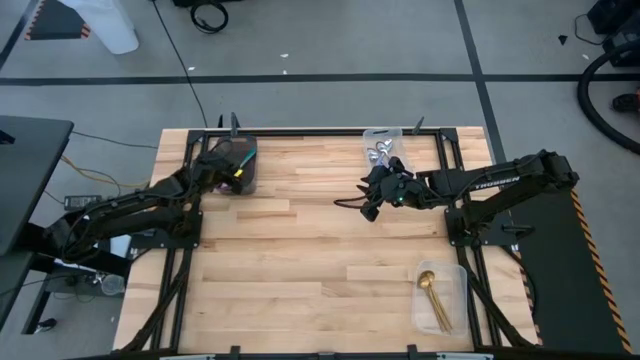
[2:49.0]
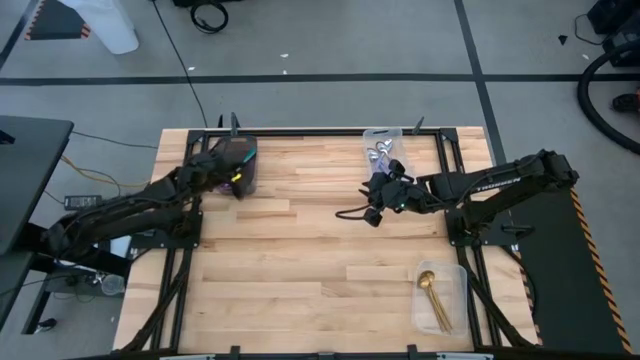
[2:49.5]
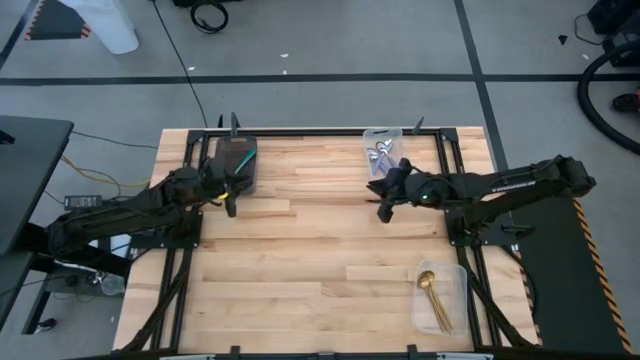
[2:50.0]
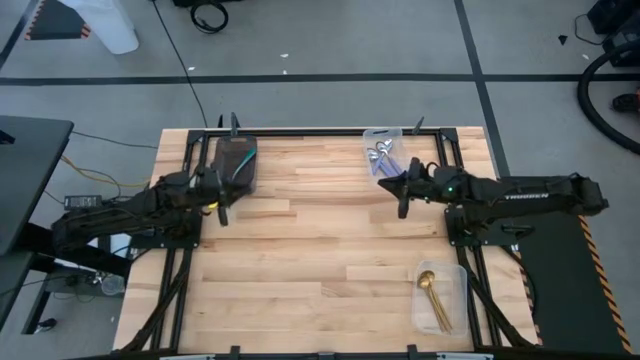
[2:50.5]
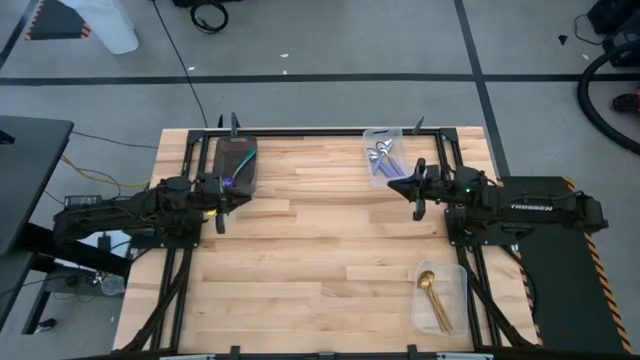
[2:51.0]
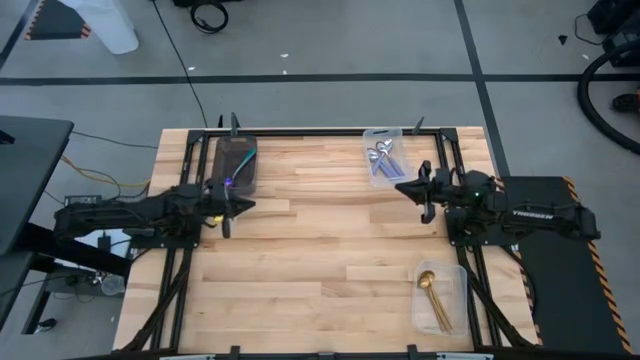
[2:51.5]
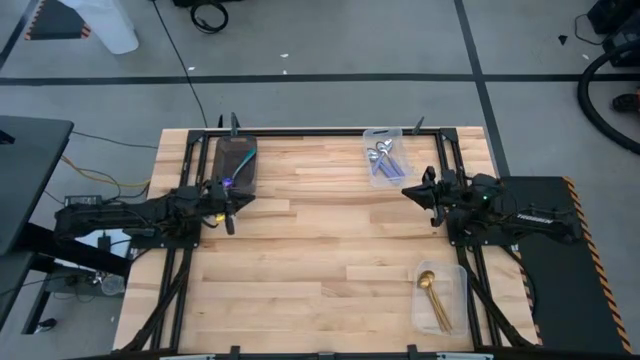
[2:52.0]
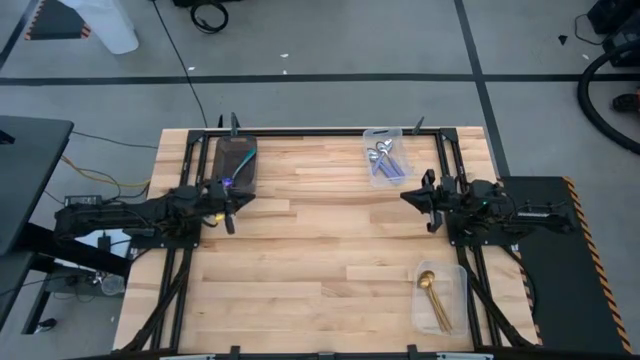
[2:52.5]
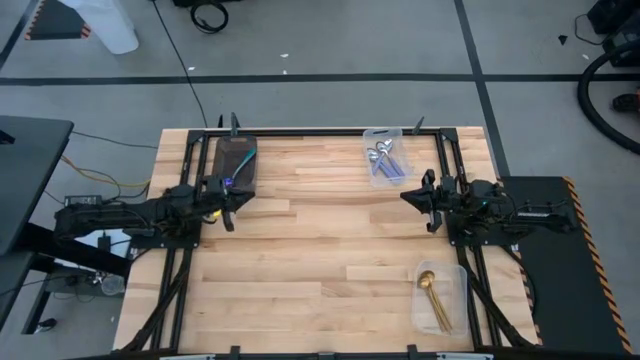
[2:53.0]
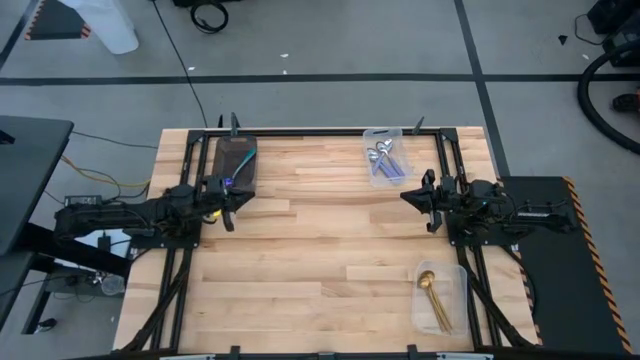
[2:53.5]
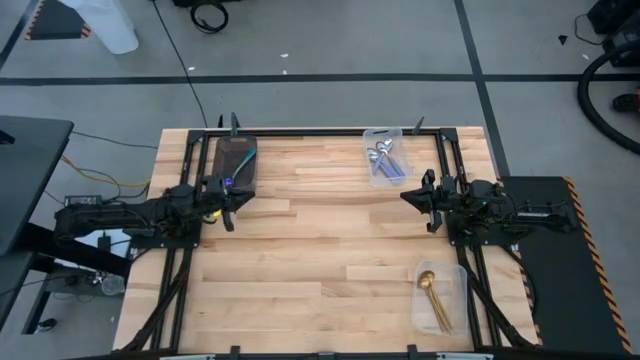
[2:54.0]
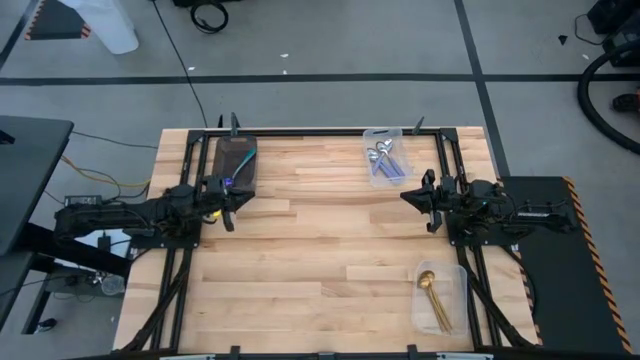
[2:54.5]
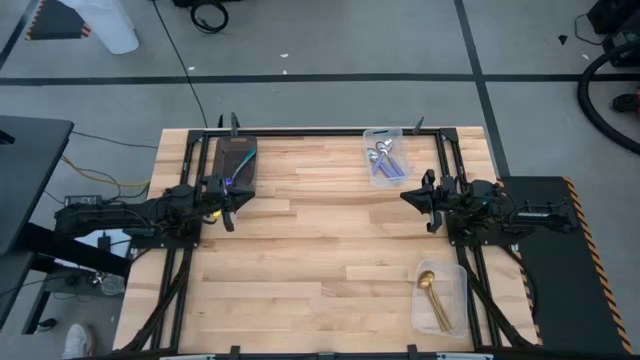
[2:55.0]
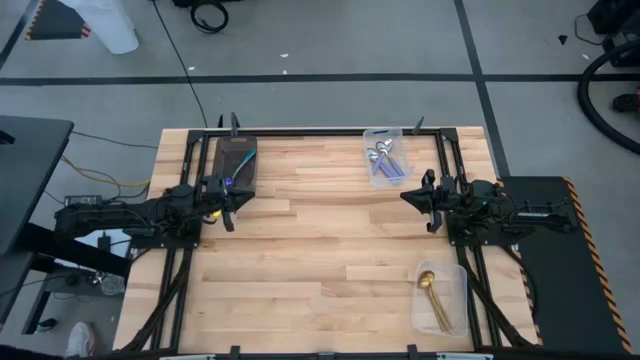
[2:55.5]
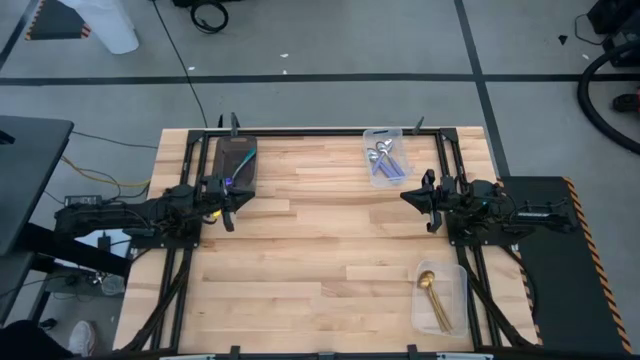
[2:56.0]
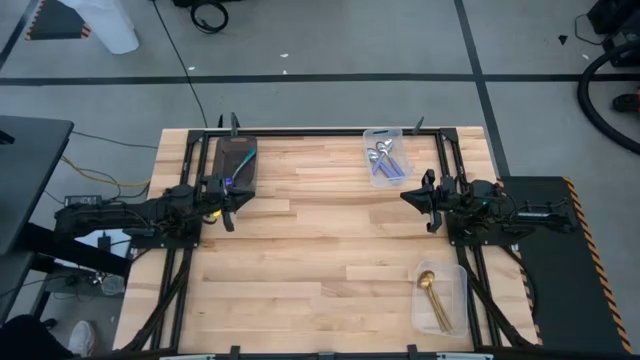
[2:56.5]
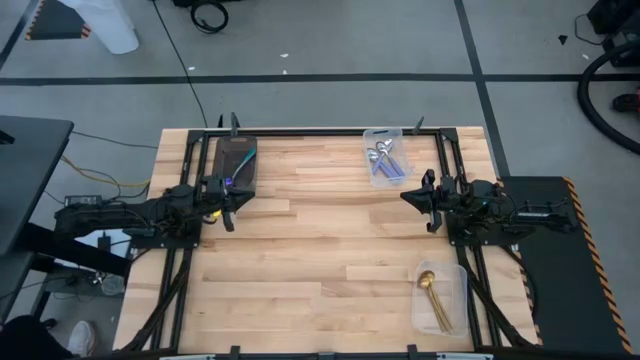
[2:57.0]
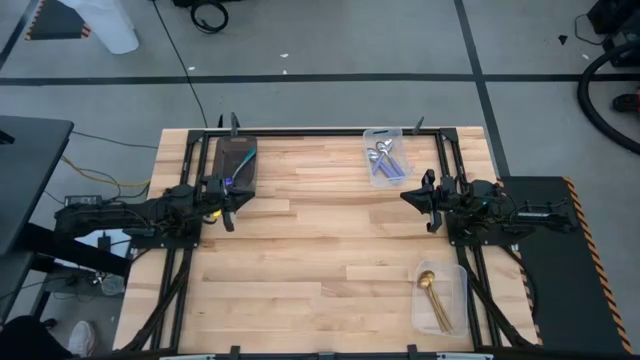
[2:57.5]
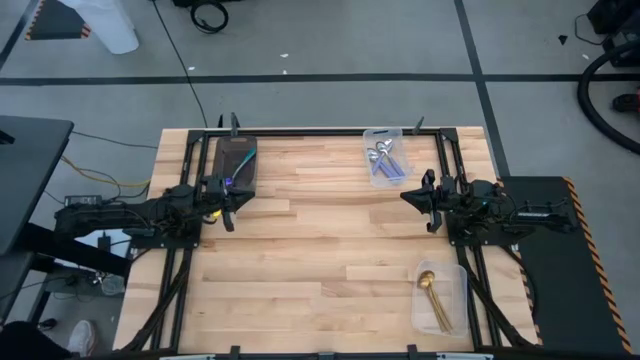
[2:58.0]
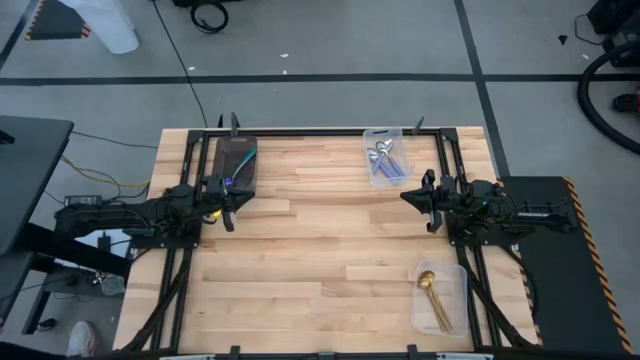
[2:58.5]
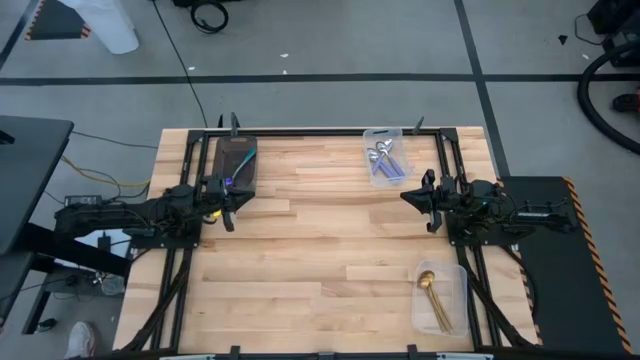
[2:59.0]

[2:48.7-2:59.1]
Task: Sort silverware by color (type)
Return to Home Position

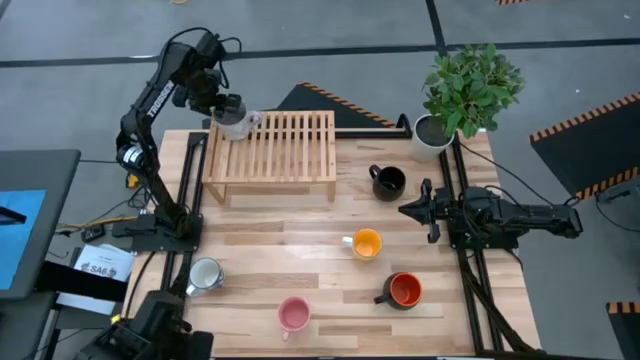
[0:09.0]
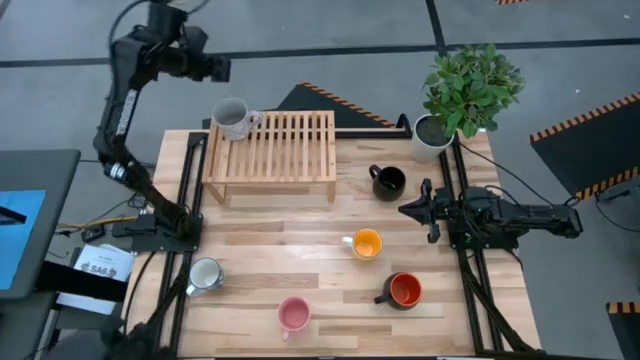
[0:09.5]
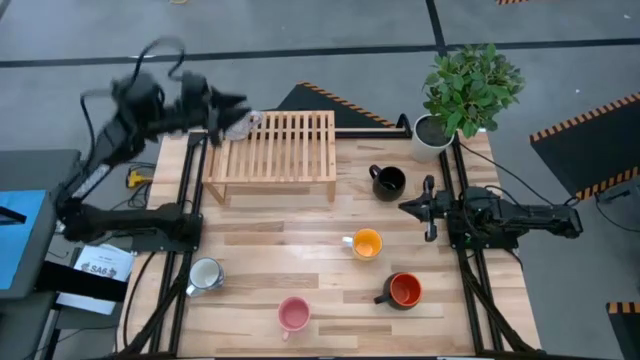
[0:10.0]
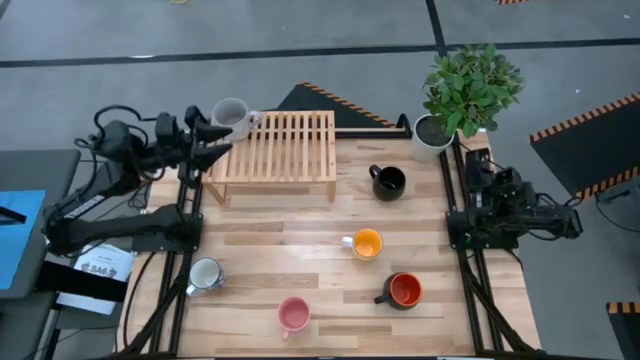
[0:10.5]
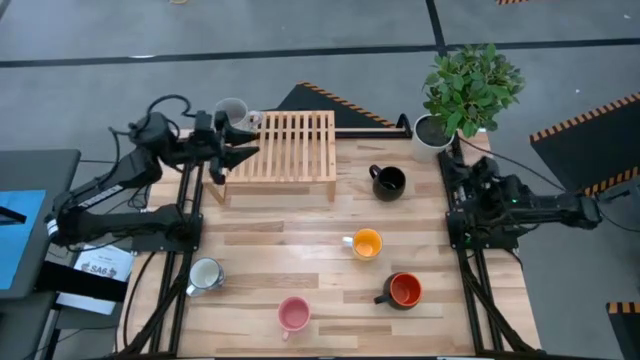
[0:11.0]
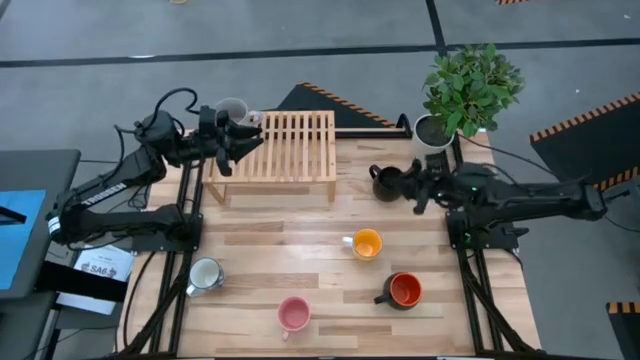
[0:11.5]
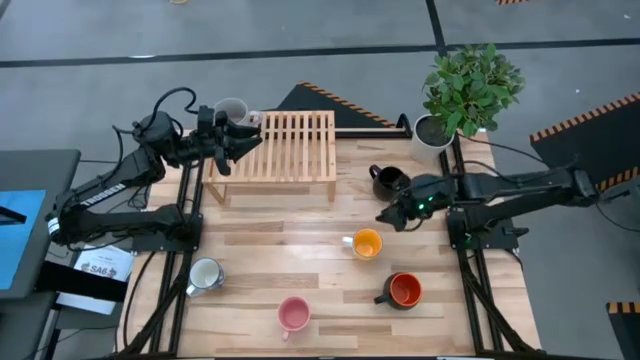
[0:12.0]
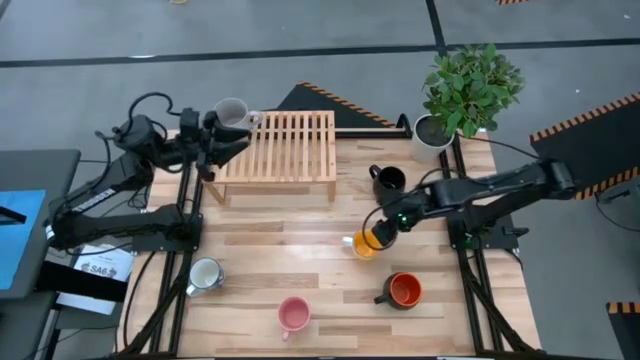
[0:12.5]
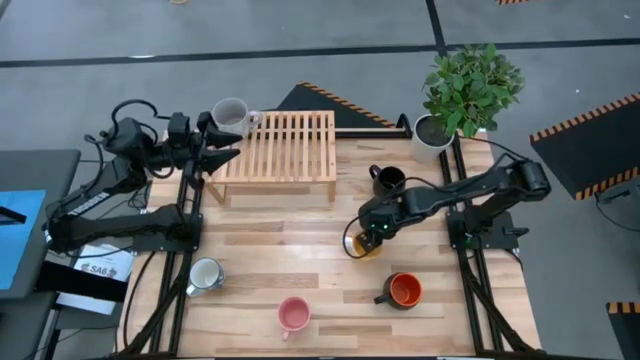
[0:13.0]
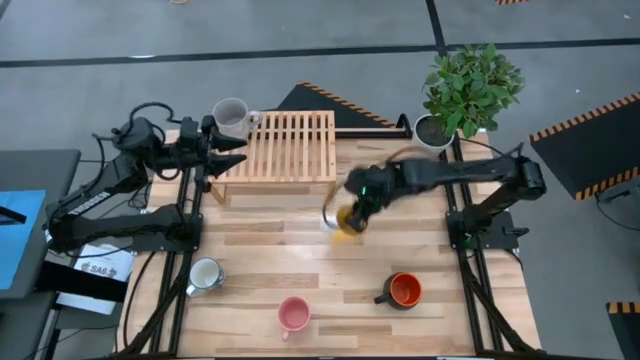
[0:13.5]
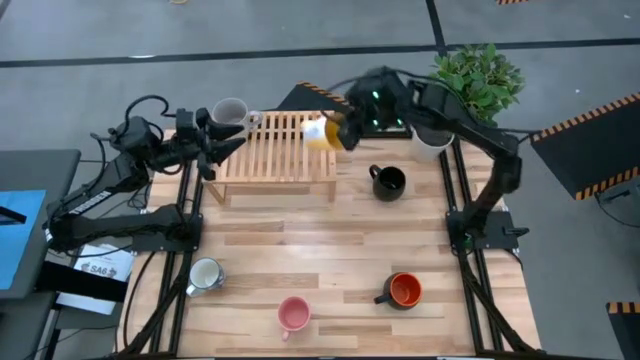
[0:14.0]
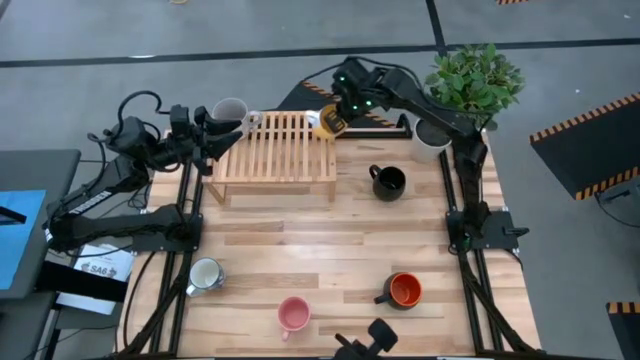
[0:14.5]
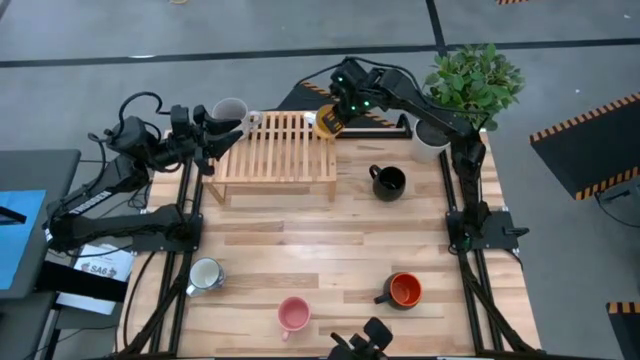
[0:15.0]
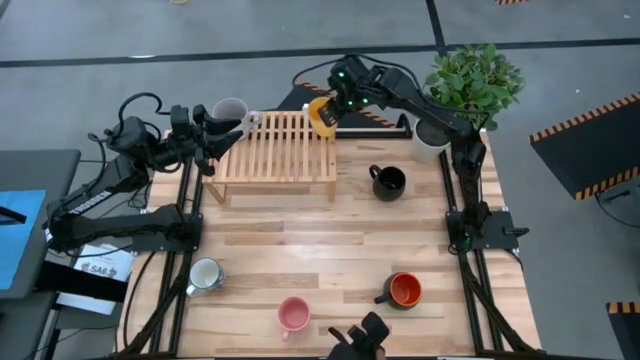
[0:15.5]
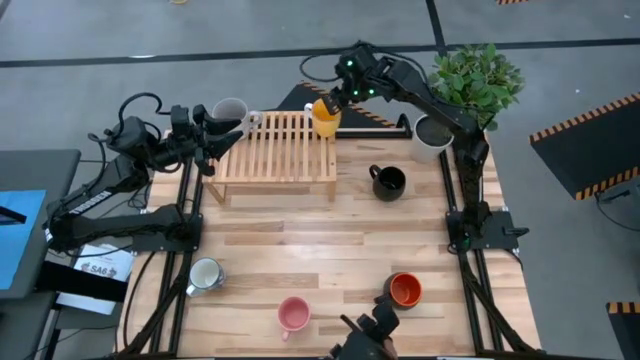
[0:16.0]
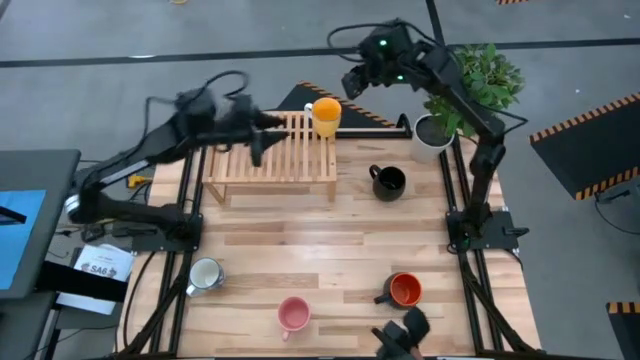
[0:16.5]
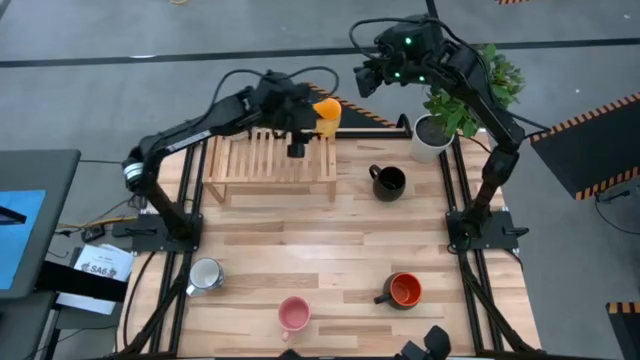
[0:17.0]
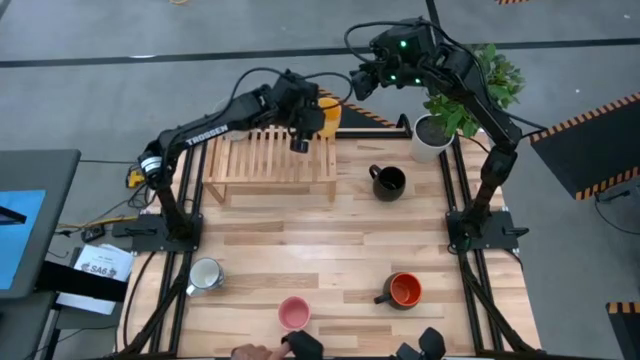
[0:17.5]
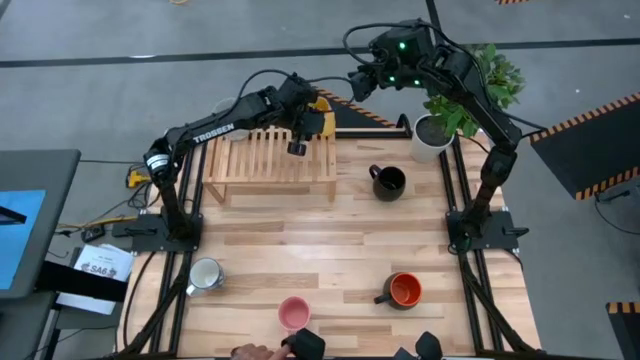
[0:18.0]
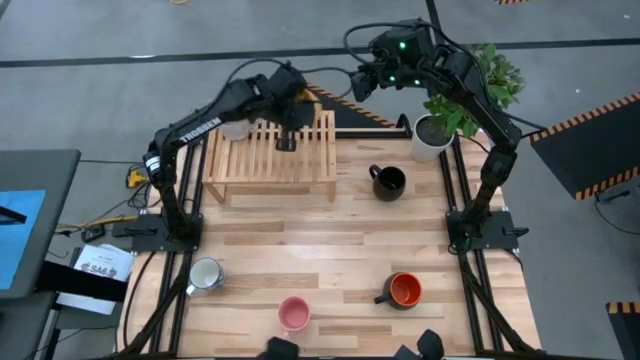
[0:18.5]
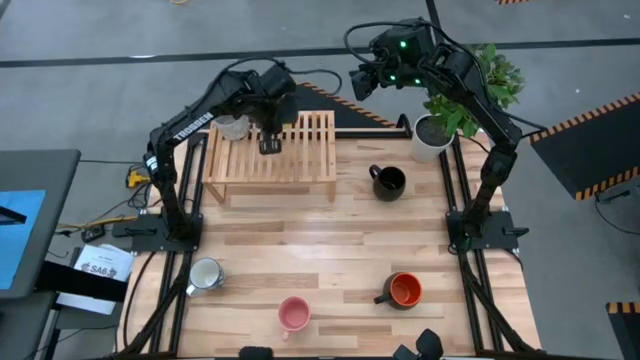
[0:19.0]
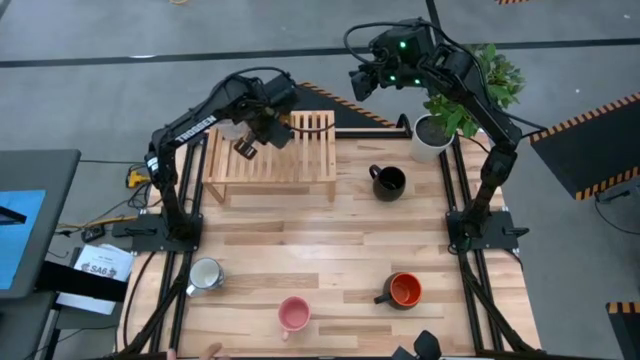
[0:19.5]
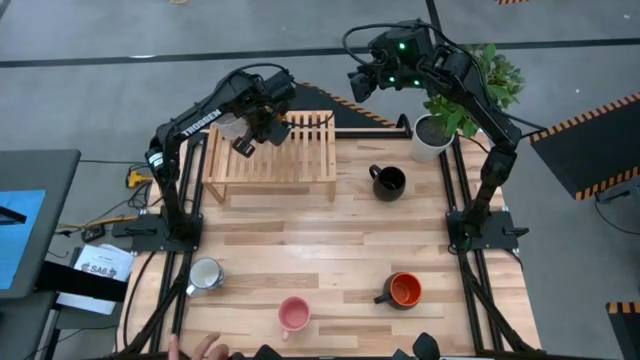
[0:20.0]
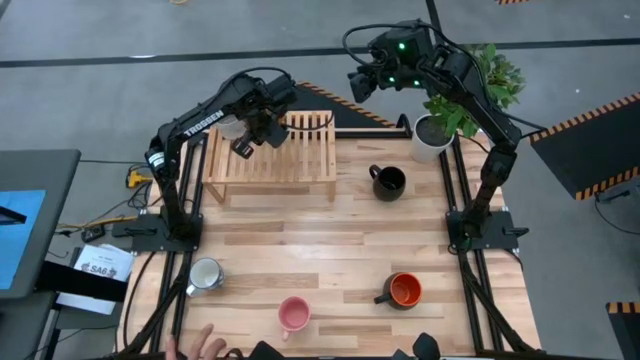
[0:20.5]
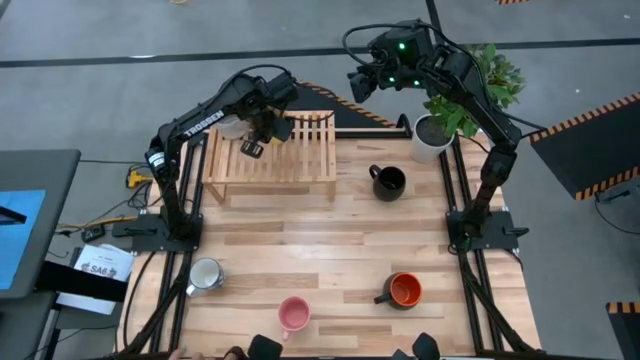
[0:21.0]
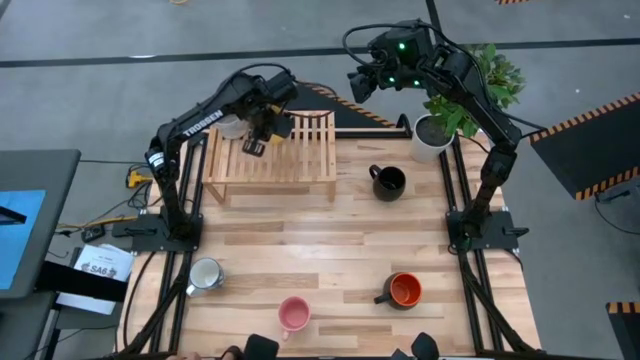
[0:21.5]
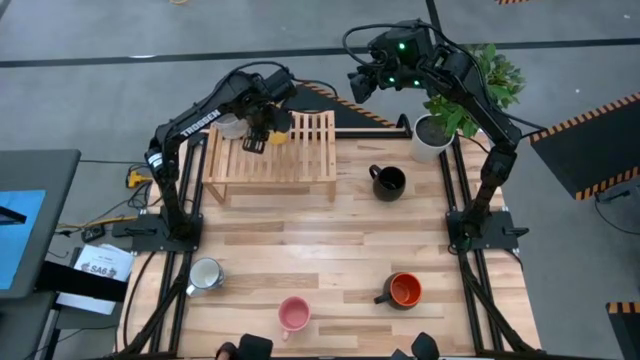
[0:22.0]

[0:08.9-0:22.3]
Task: Place coffee mugs
Put the yellow mug on the shelf
